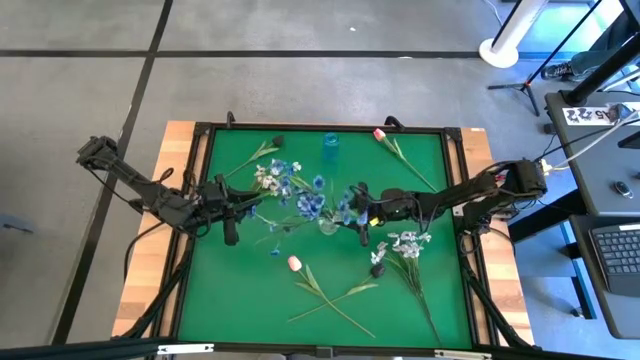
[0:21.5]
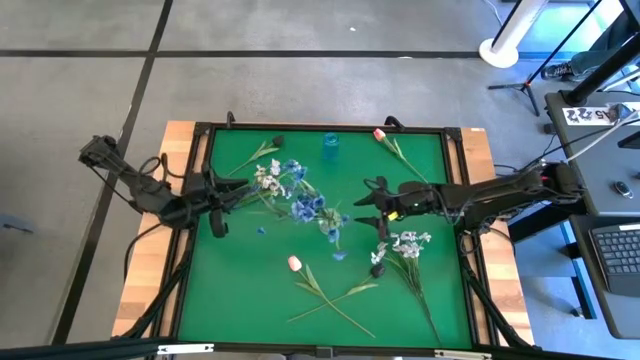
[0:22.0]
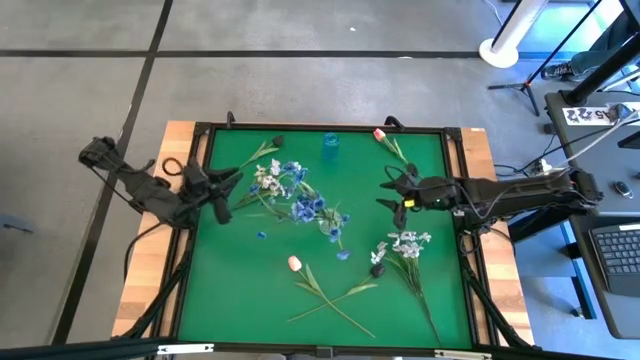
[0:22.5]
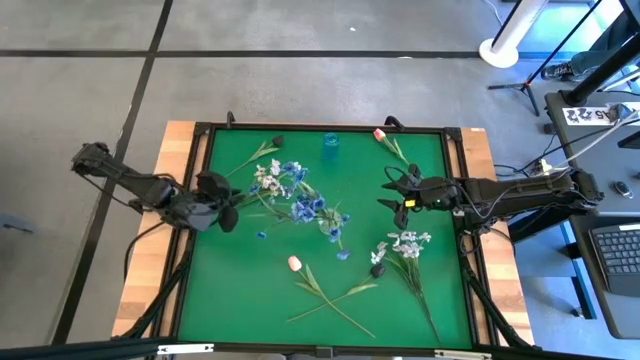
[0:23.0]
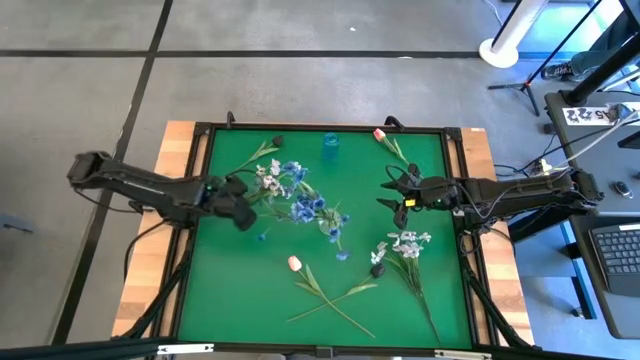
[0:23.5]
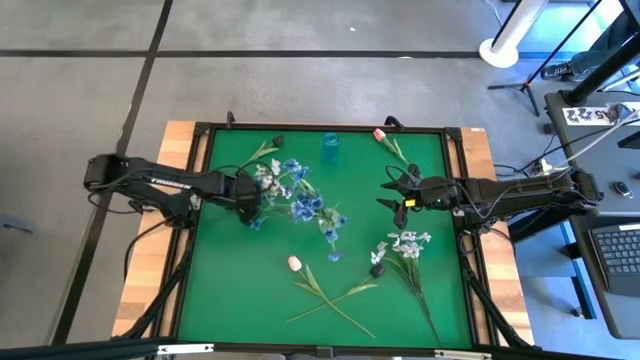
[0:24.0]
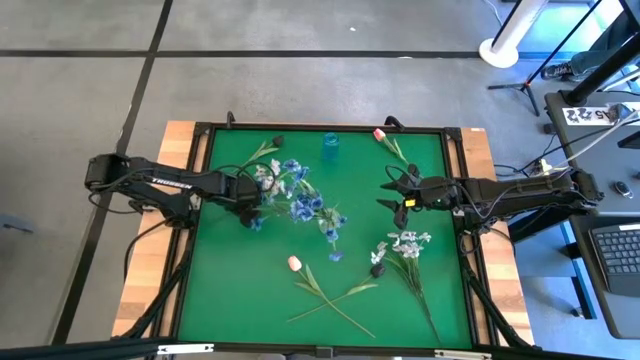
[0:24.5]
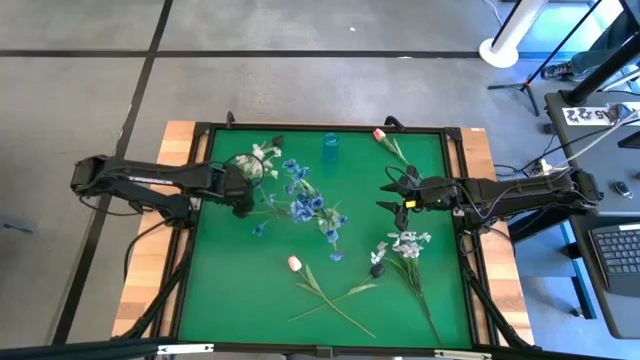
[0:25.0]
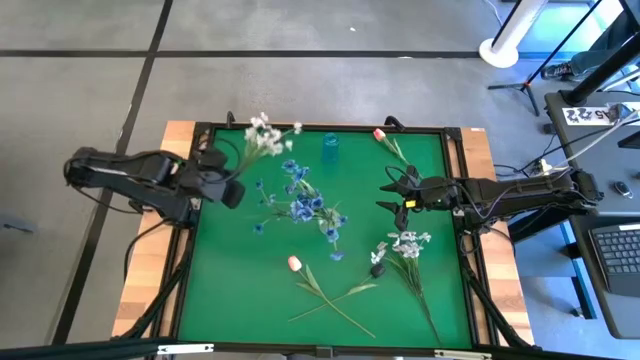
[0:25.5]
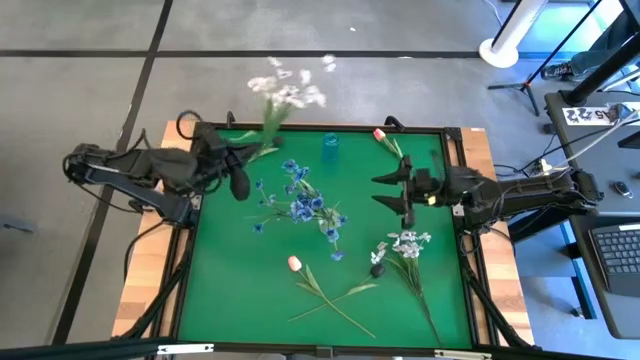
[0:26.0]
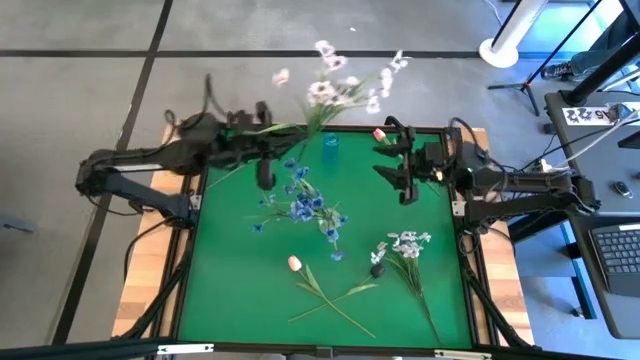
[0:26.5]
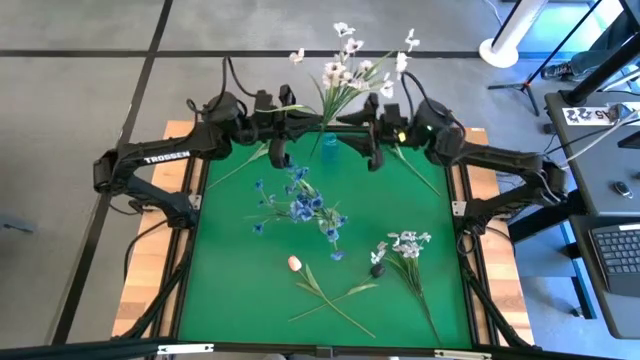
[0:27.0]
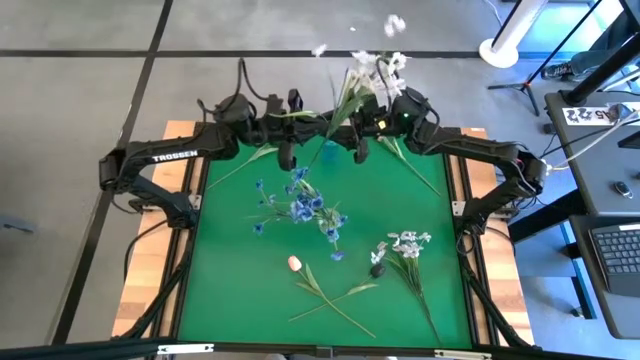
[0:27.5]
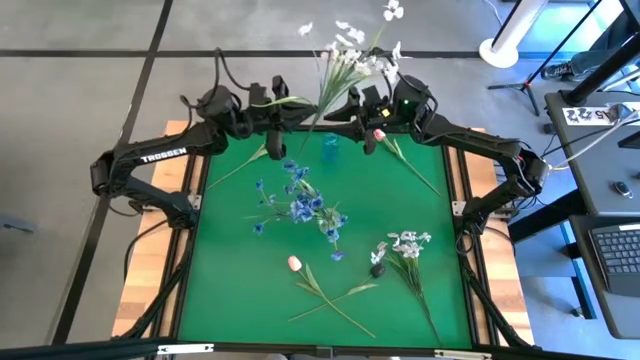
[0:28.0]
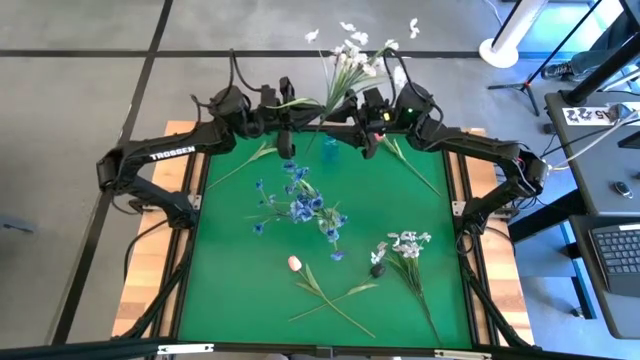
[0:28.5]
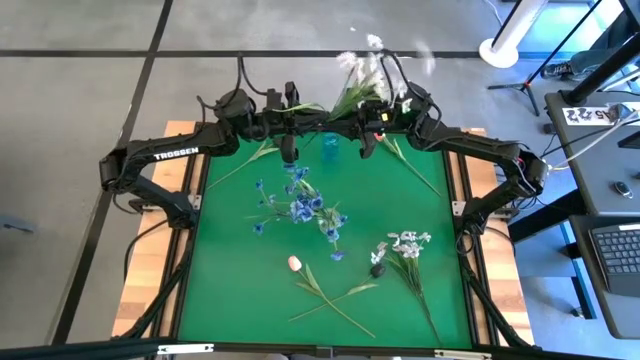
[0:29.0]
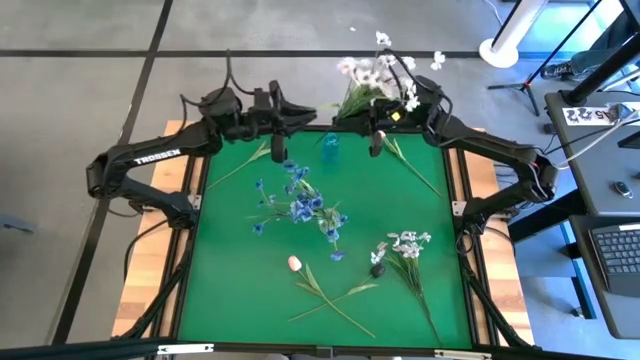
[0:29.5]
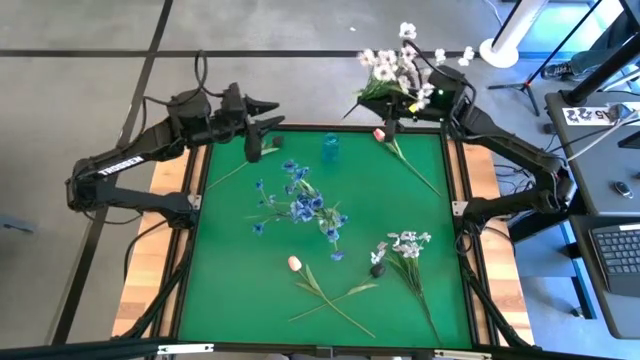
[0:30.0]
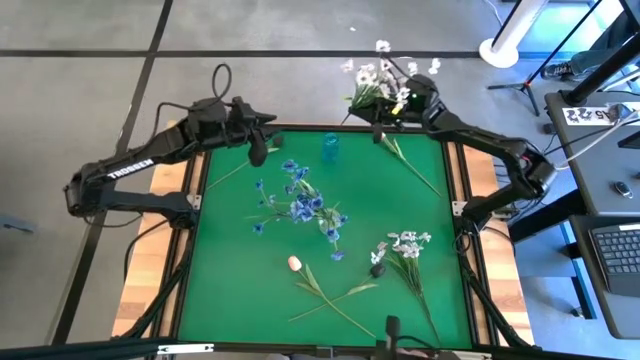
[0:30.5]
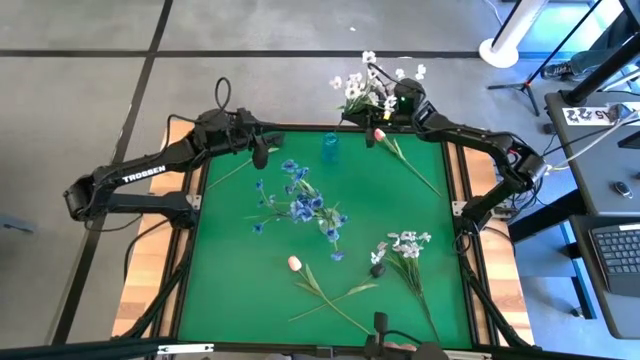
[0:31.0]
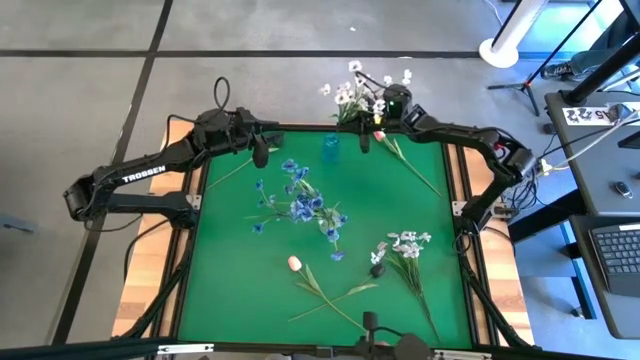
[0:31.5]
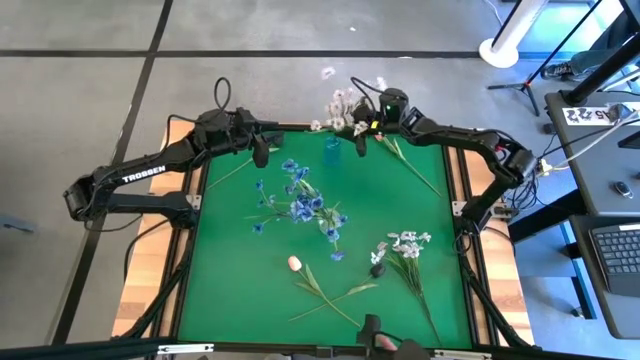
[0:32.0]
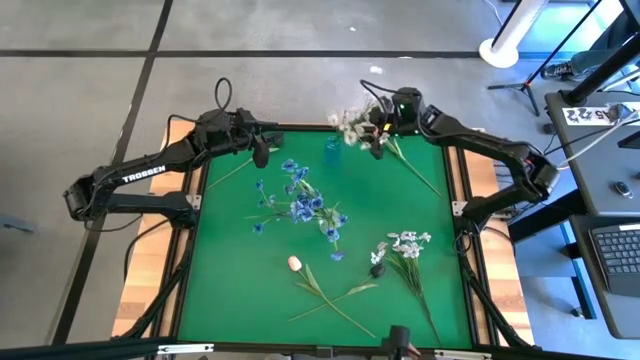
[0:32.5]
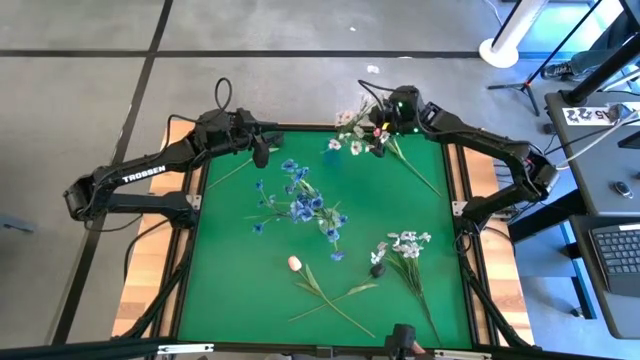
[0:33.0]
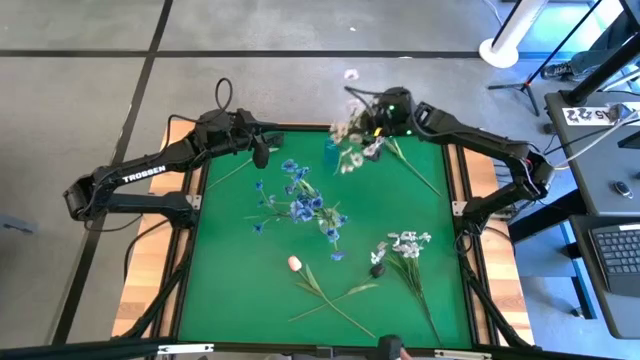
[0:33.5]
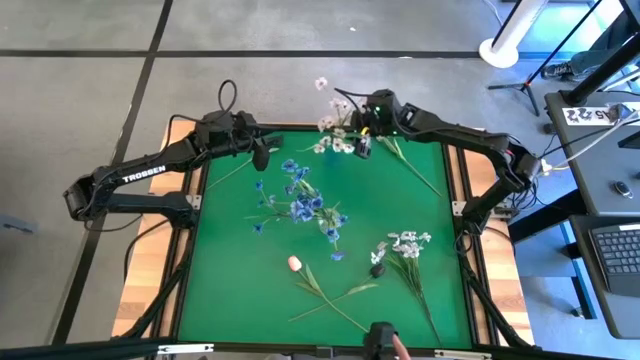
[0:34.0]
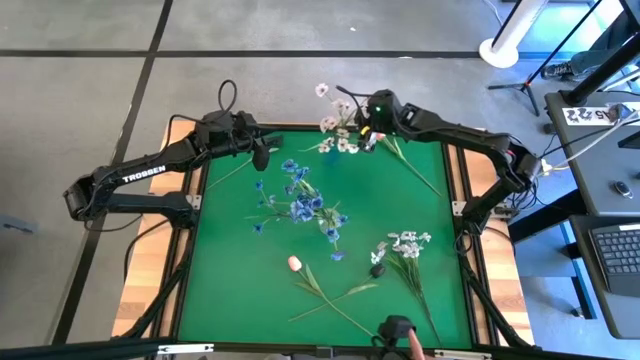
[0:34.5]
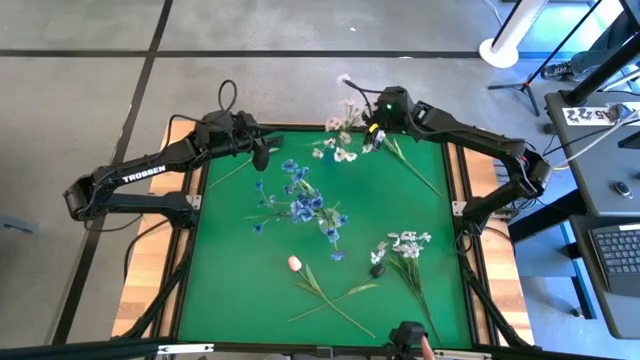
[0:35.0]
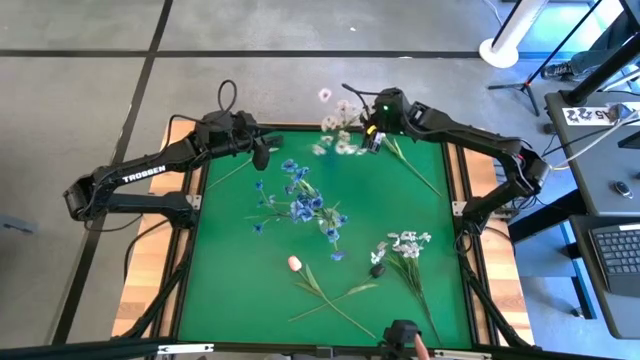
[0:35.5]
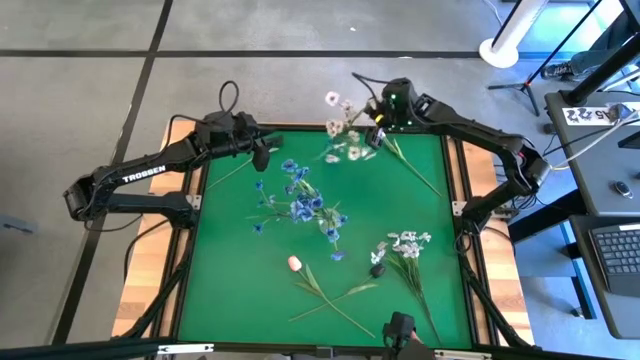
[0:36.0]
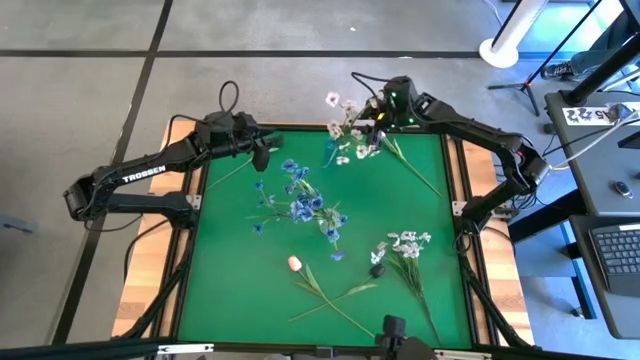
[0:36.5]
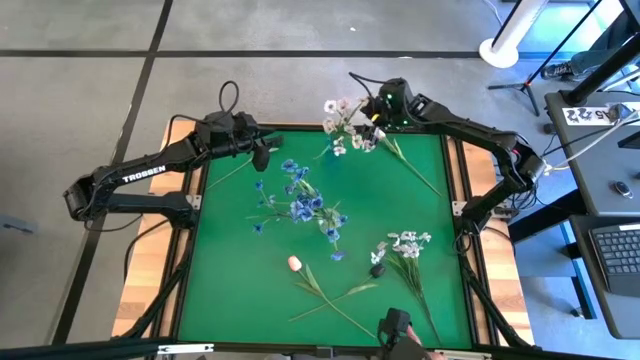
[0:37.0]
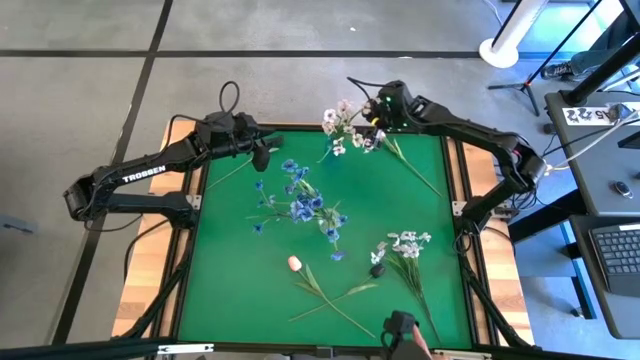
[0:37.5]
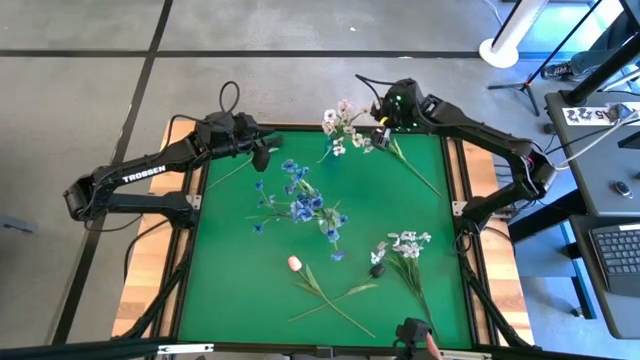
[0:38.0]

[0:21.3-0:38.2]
Task: Sort flowers into vase by color
Put the white flowers into the blue vase
